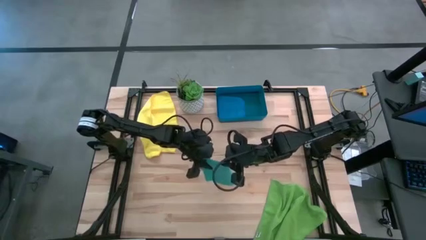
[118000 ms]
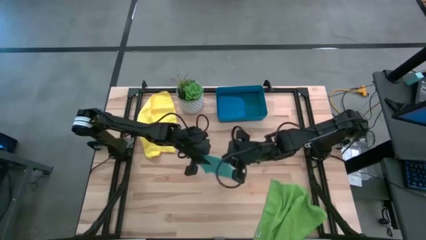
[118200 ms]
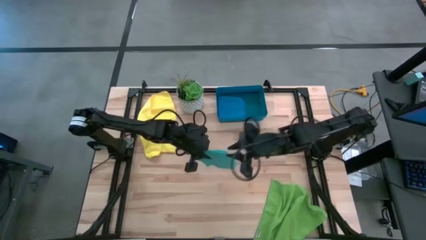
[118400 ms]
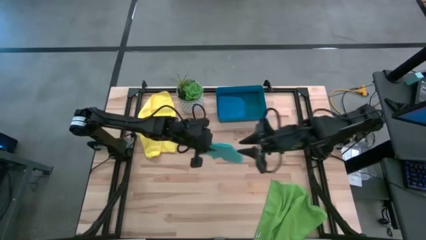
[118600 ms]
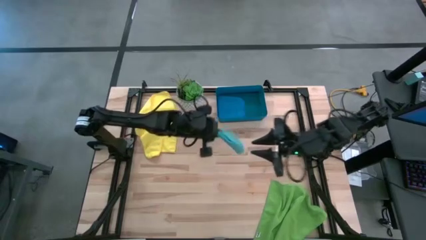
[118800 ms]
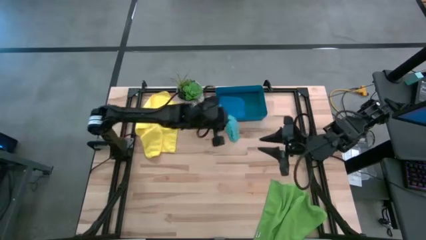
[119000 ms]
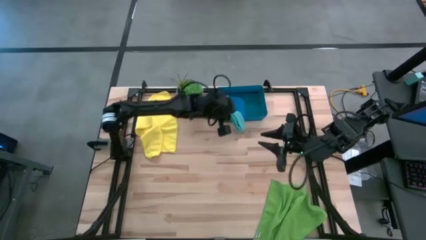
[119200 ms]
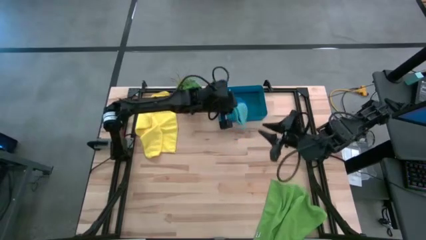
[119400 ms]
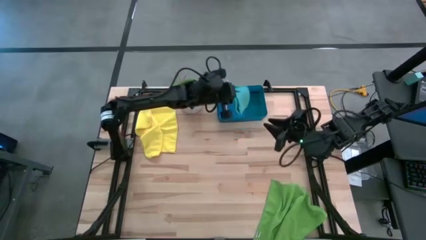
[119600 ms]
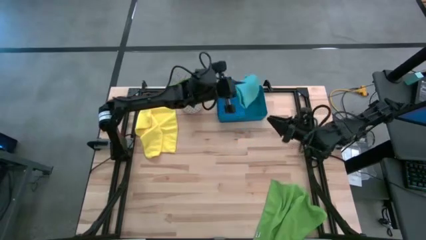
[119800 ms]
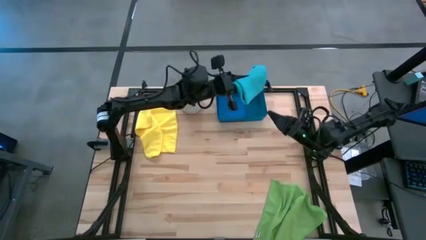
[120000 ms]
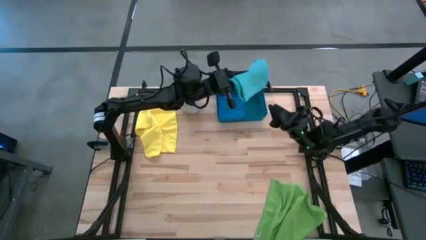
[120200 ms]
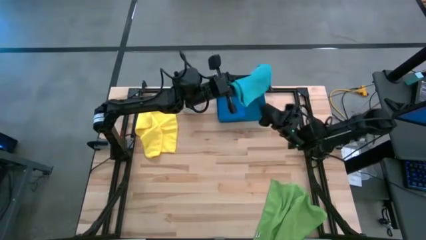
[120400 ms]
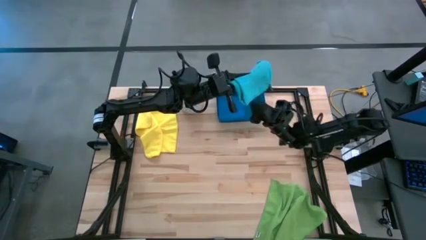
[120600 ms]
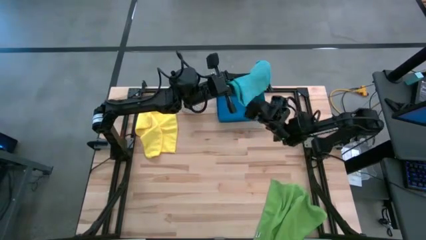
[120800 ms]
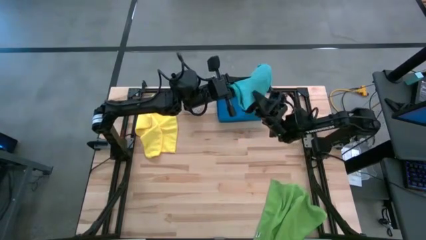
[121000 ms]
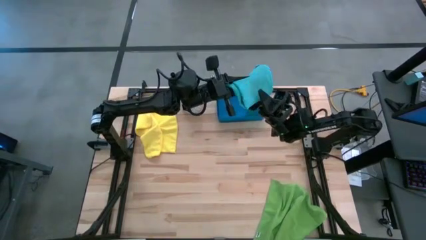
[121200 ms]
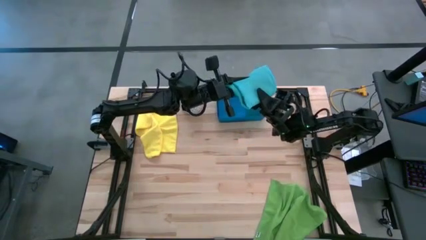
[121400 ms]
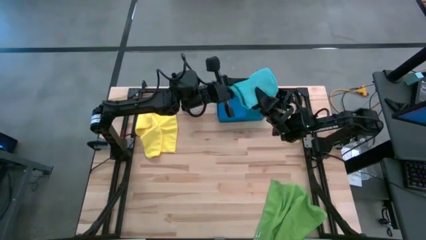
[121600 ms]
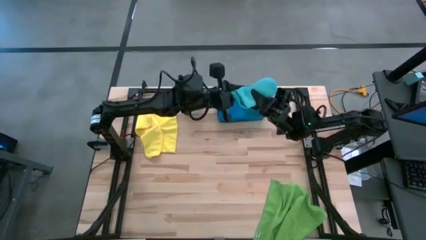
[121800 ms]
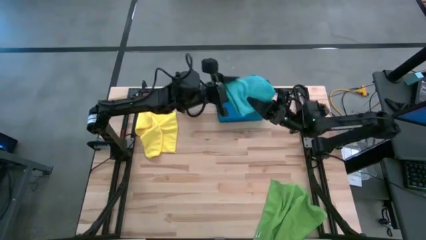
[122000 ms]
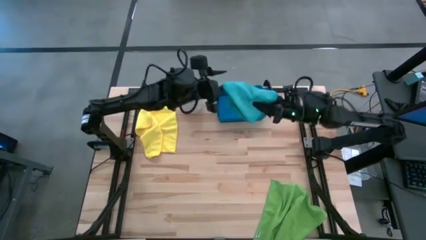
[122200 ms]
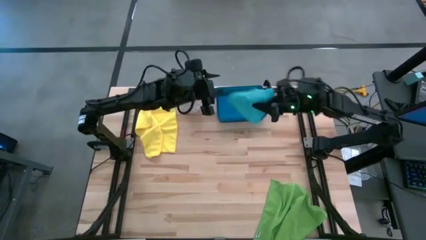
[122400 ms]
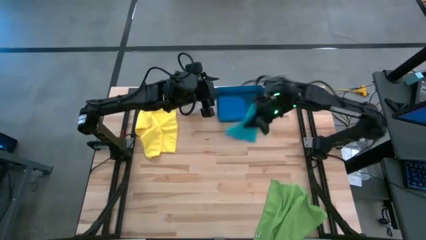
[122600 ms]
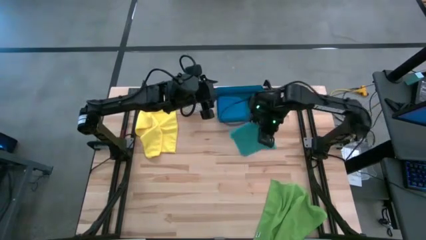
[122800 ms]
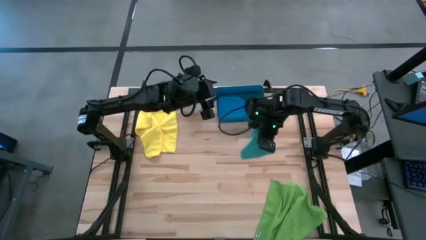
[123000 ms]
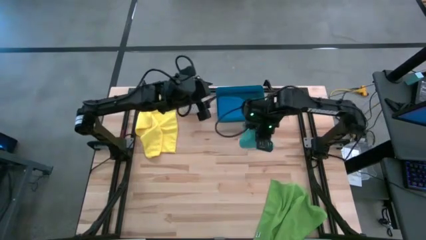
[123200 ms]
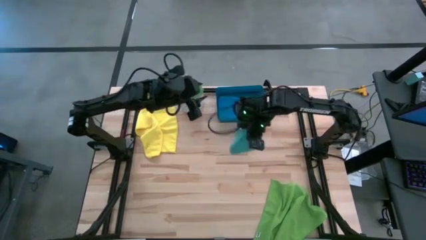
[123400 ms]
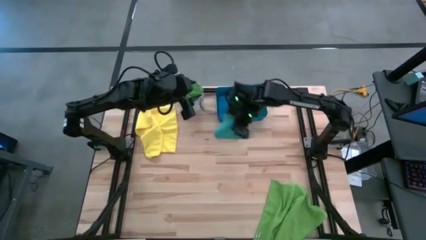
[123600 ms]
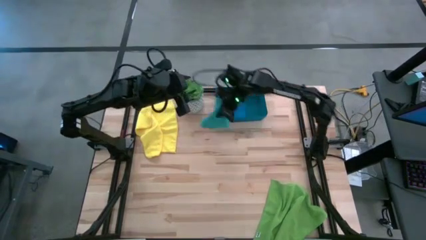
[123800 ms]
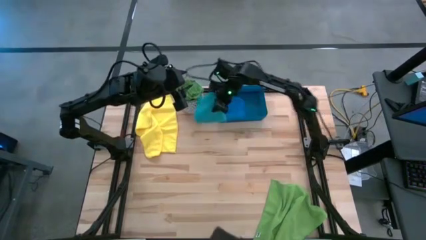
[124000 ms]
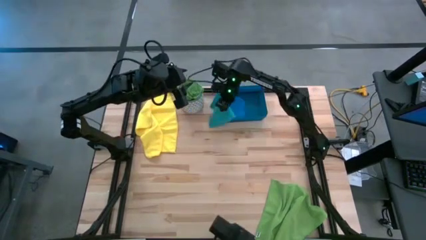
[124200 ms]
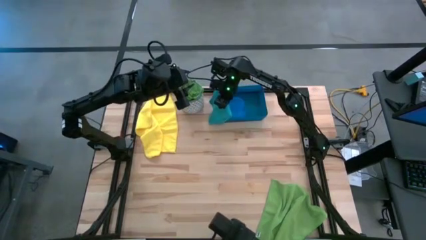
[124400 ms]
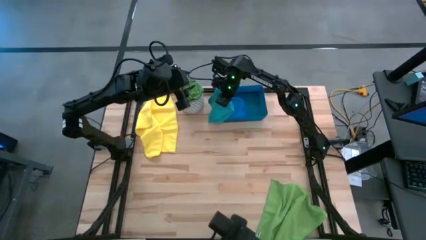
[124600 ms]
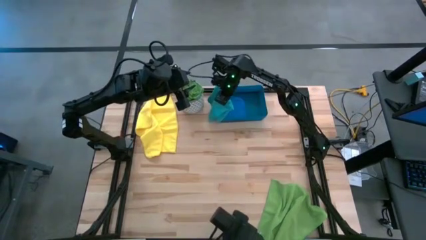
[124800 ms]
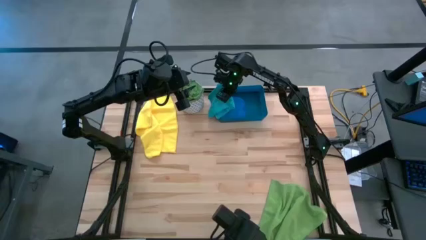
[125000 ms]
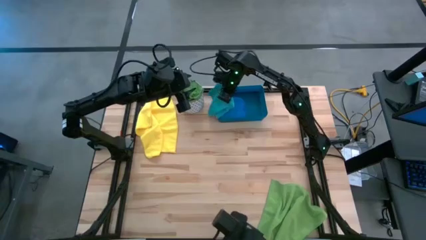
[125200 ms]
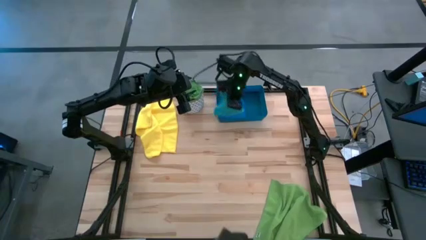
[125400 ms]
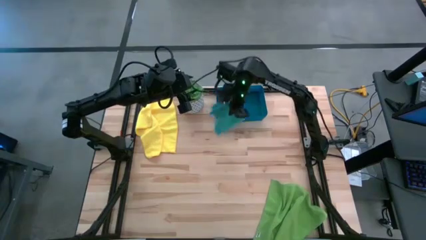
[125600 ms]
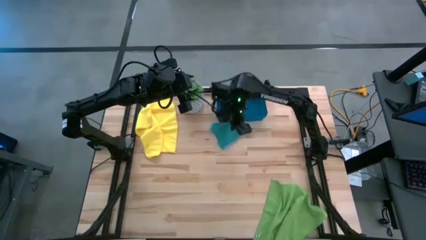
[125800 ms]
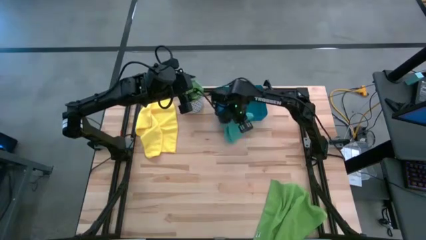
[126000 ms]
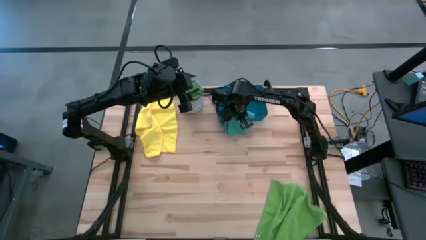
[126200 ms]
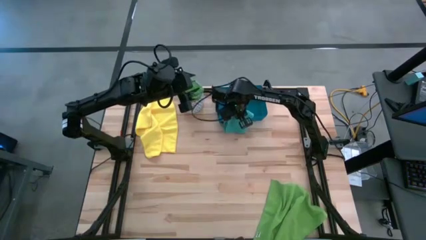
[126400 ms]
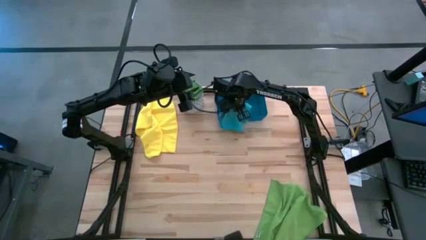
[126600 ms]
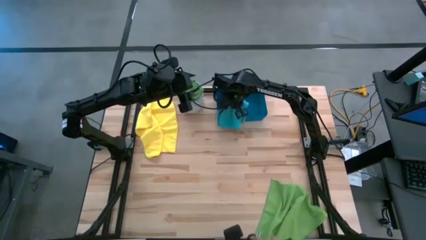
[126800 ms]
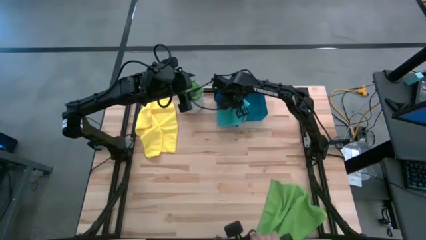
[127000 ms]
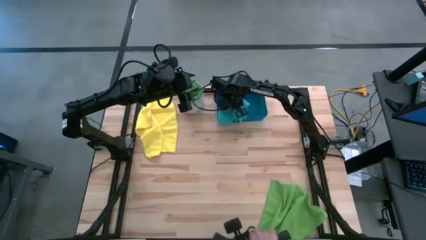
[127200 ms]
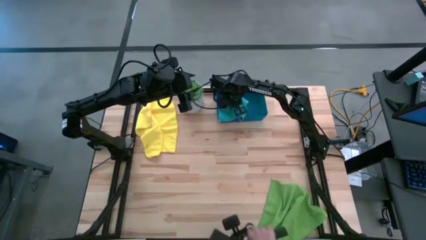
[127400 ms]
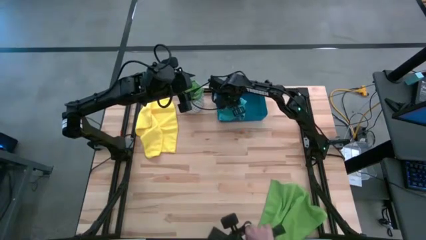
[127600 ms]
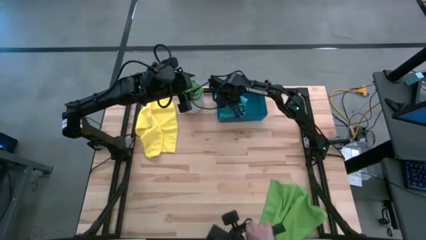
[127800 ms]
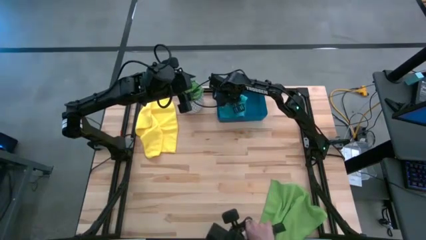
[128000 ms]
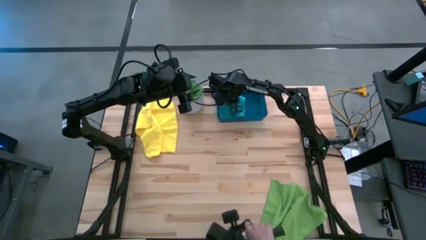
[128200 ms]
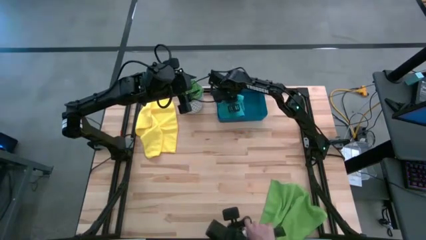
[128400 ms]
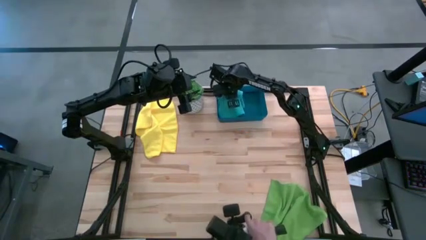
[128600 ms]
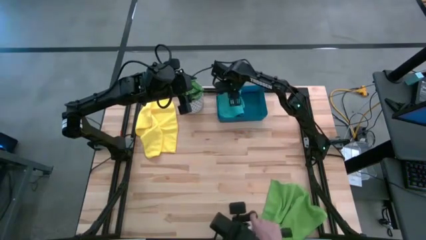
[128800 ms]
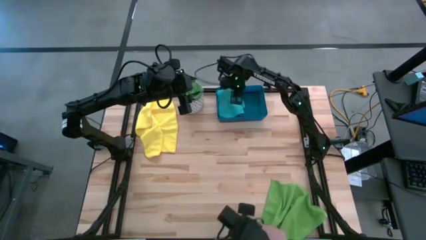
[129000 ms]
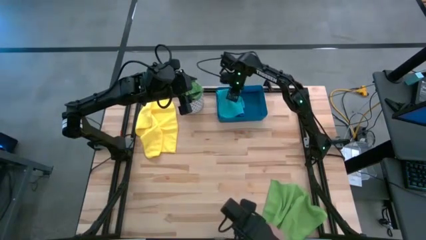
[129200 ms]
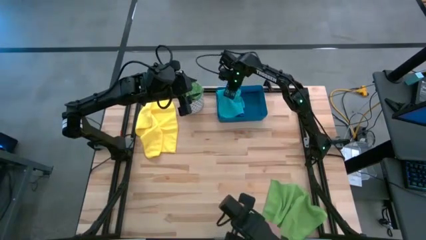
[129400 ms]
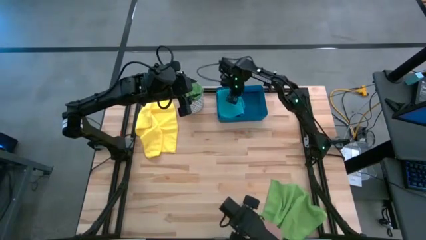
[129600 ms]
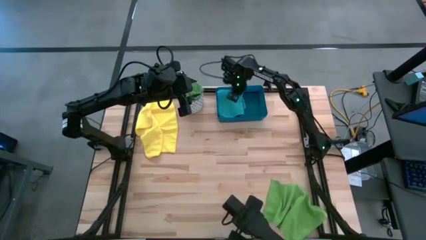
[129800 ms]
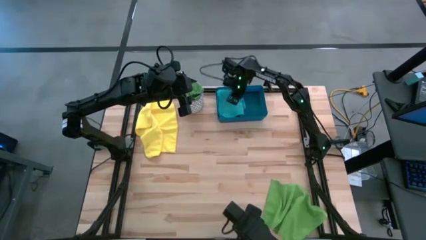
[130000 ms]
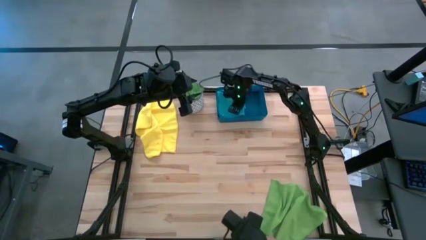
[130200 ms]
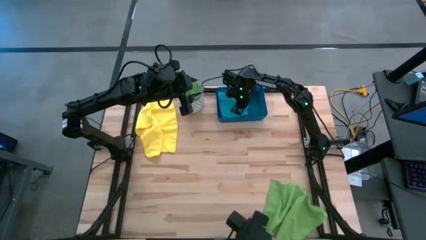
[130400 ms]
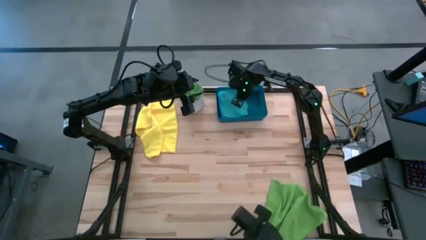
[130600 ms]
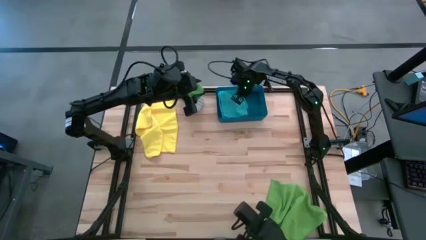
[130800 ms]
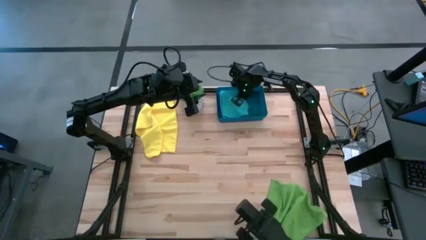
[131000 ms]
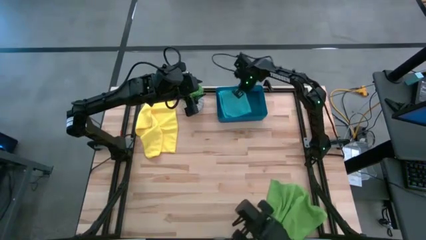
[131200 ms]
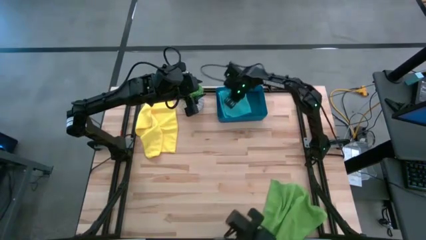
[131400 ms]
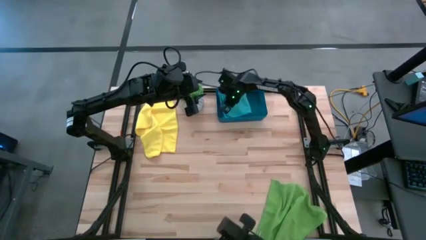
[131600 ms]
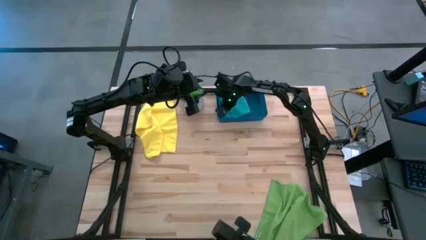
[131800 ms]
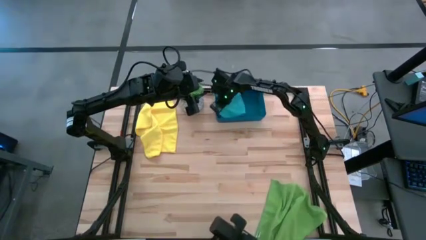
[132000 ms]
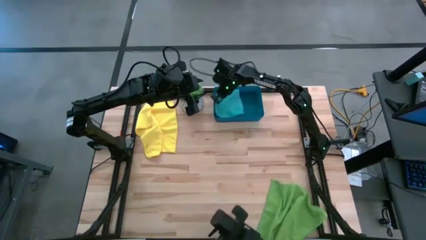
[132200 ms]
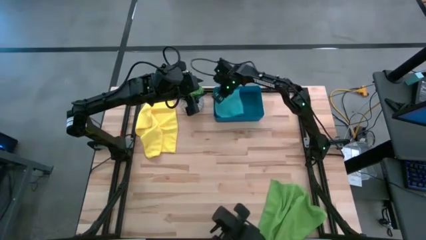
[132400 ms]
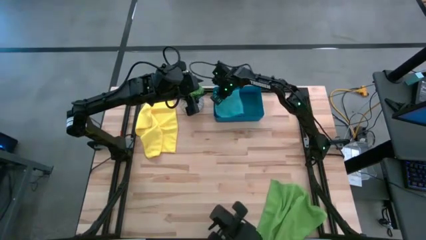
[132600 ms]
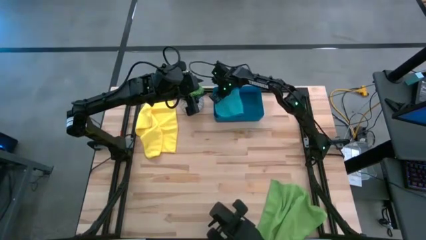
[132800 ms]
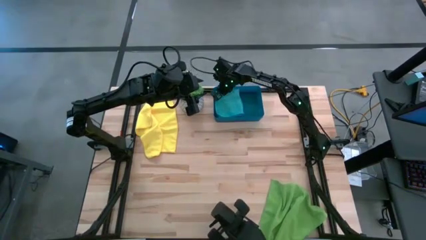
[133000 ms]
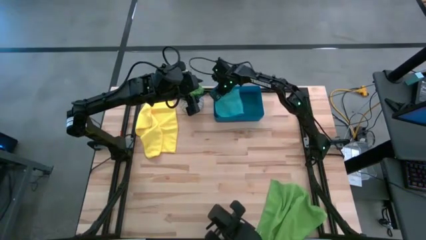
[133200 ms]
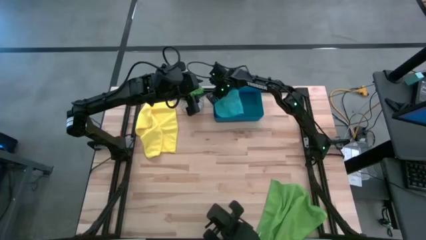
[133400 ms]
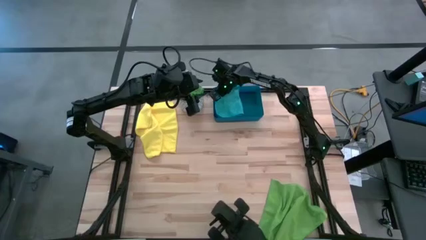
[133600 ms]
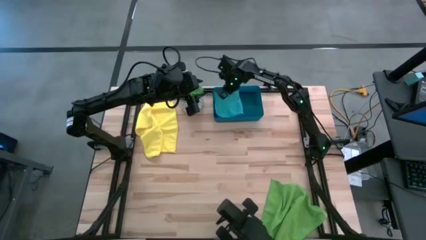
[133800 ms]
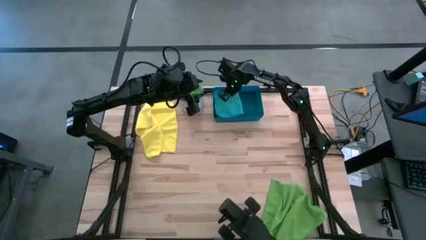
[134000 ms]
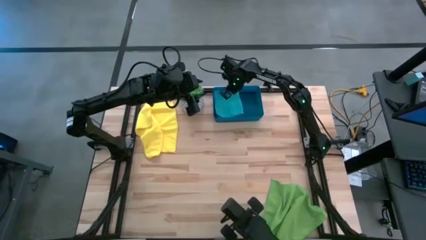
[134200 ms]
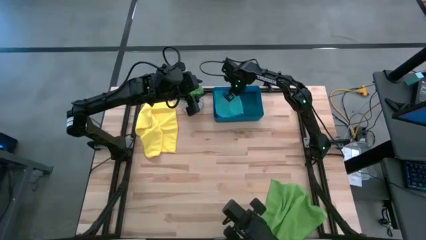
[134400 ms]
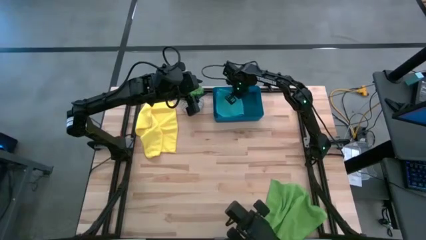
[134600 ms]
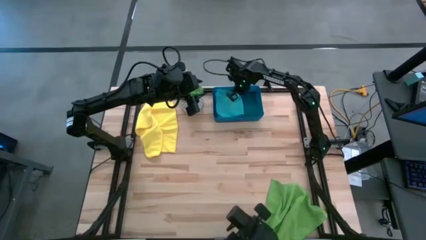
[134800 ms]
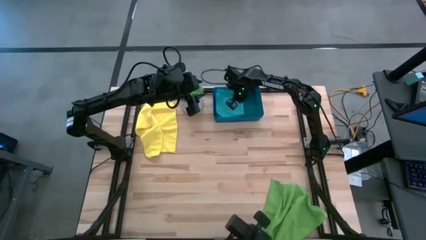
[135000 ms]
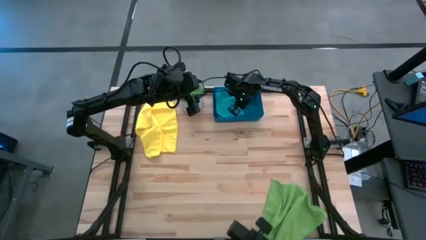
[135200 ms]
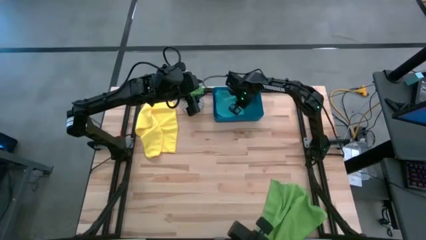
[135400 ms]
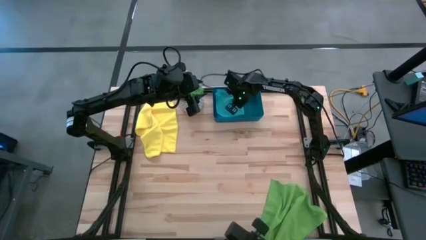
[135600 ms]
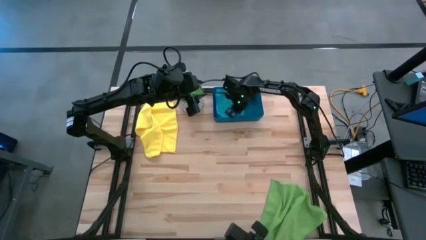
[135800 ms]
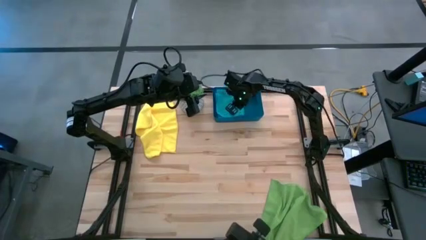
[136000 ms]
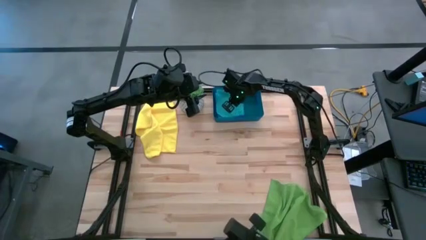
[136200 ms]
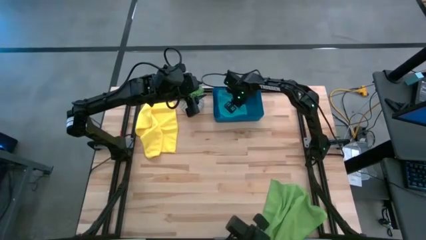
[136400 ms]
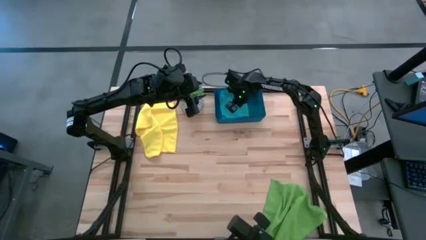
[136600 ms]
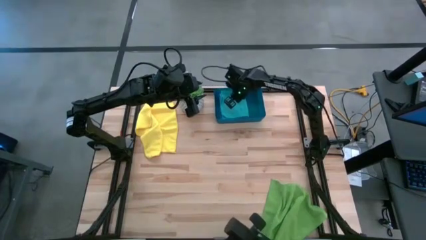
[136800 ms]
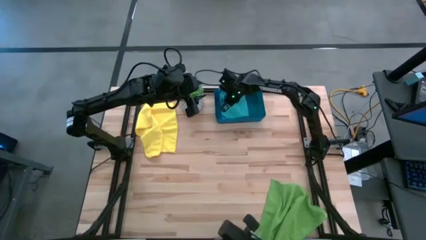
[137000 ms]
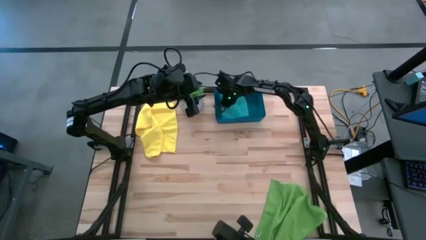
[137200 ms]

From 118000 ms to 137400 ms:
Task: Fold microfiber towels
Fold the light blue microfiber towel on top of the dark blue microfiber towel into the dark blue bin
